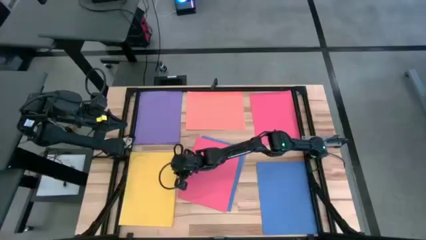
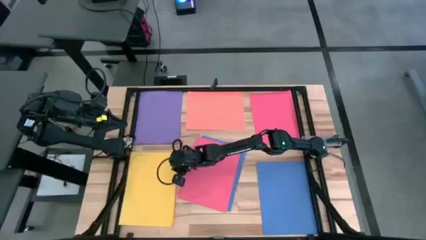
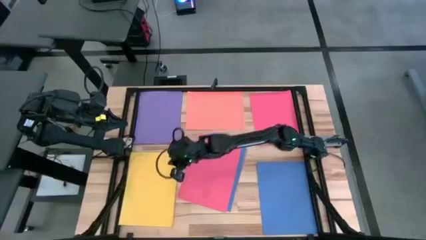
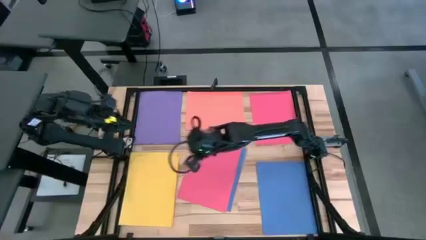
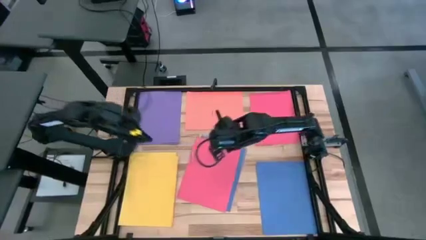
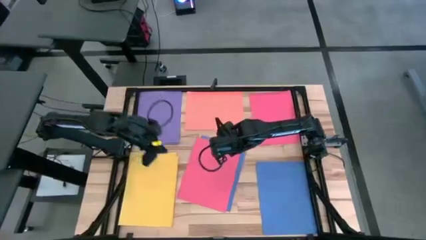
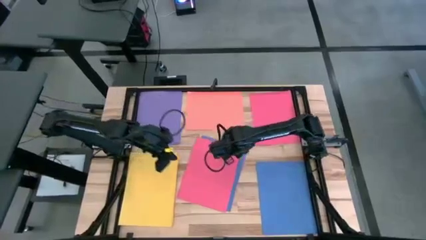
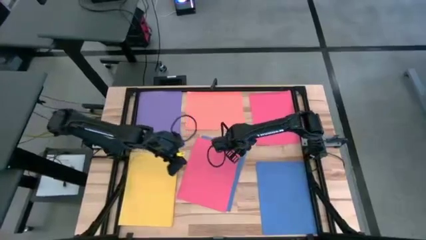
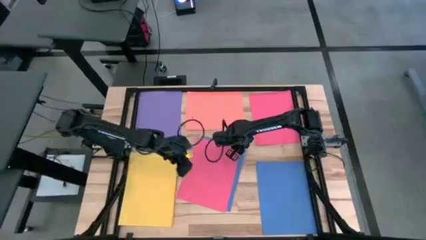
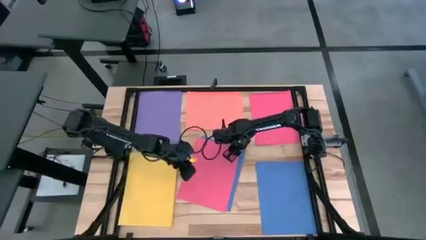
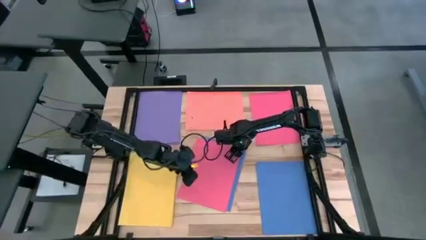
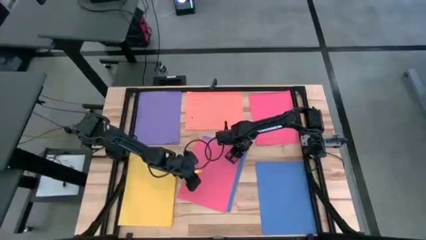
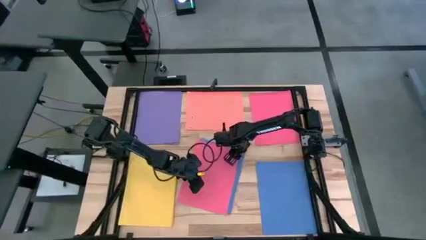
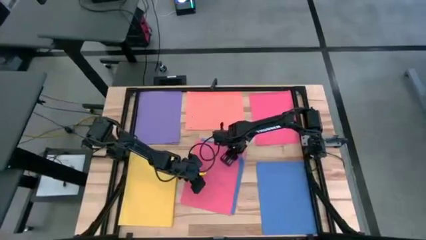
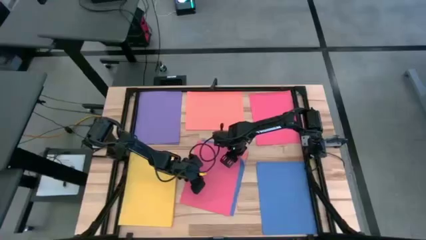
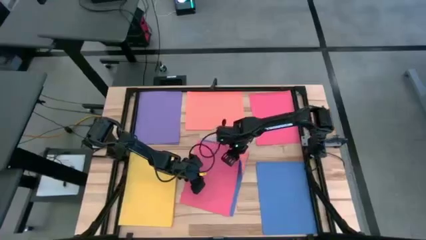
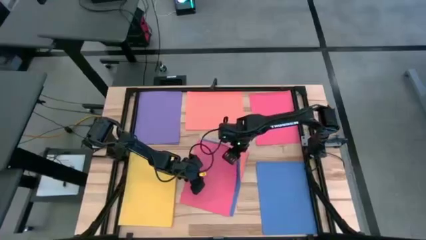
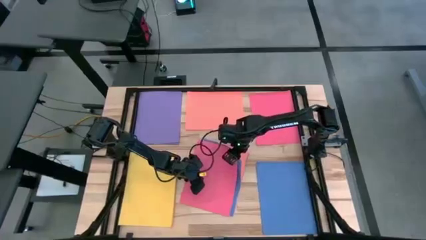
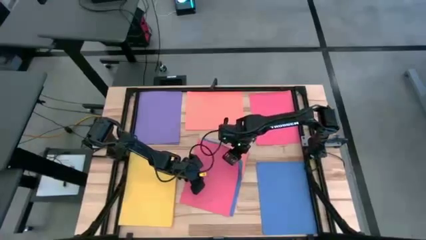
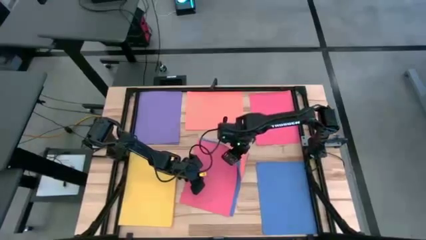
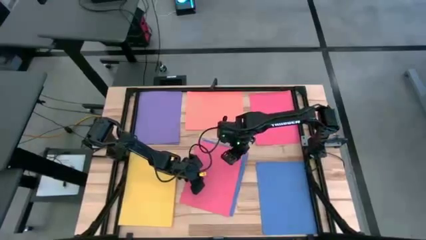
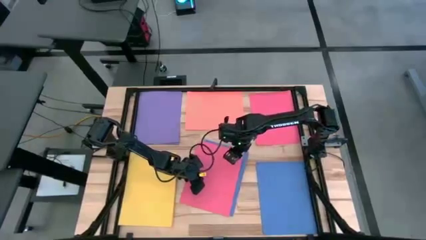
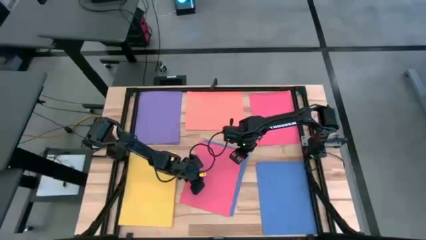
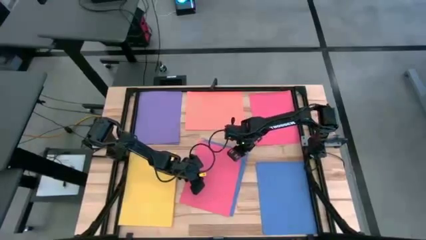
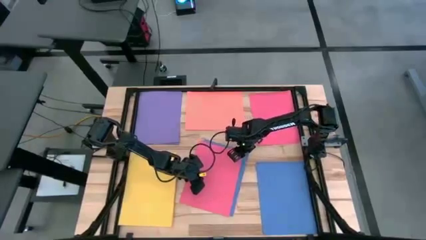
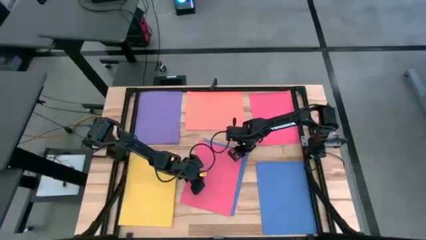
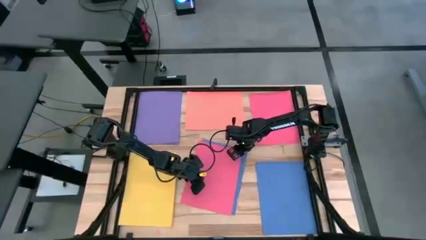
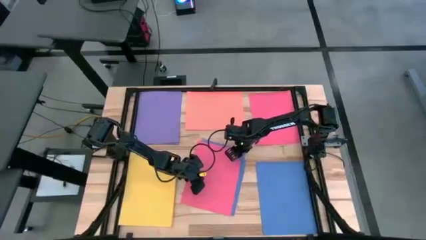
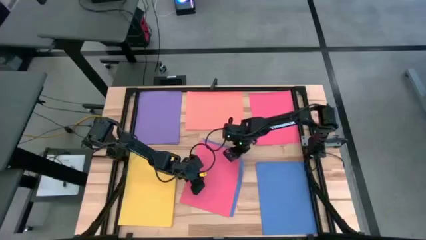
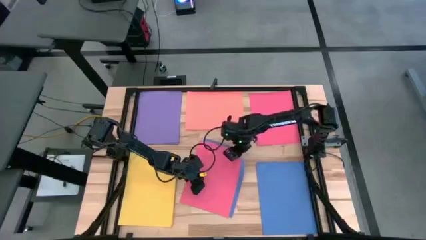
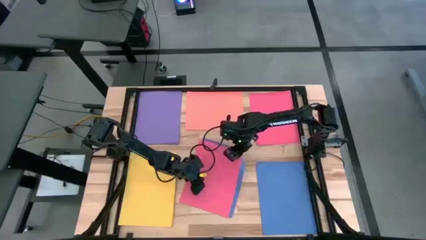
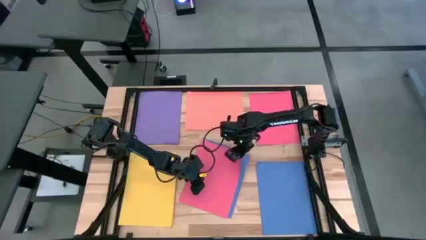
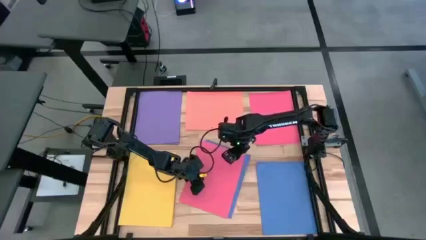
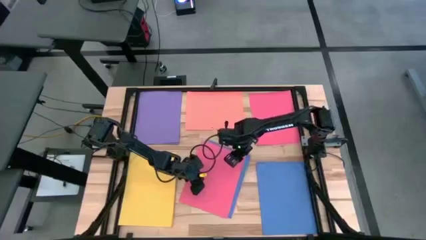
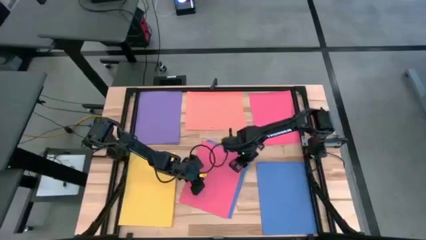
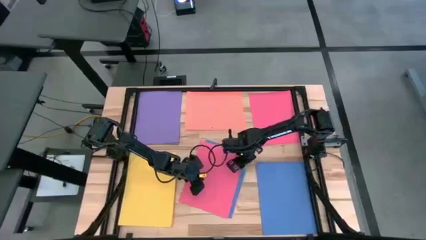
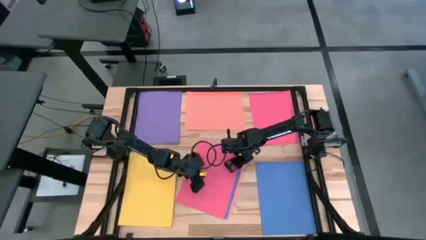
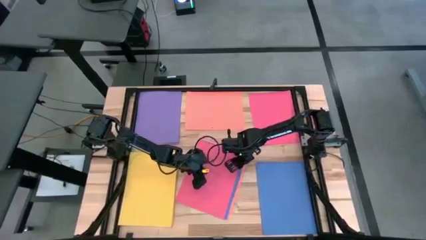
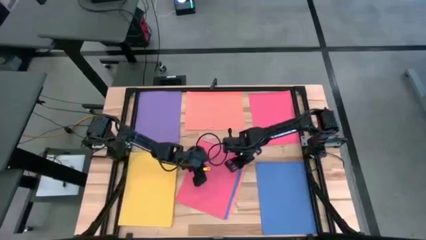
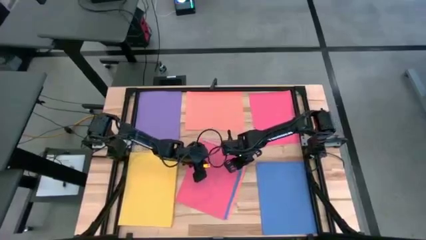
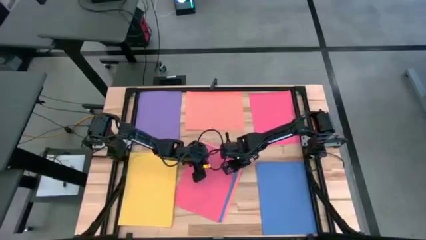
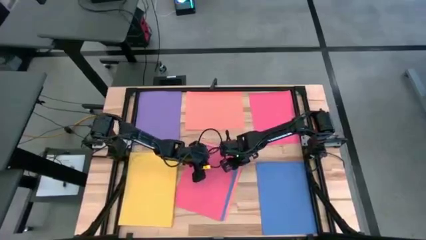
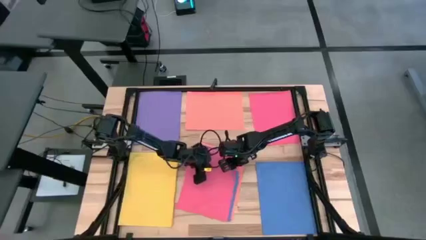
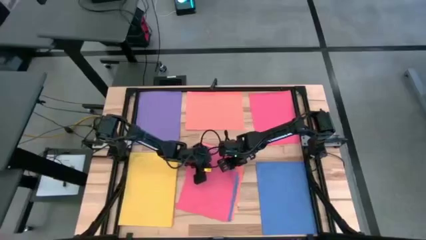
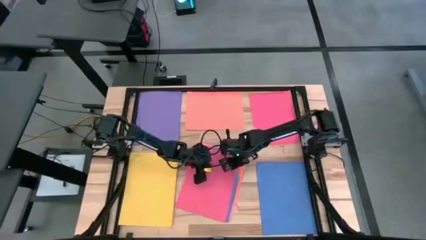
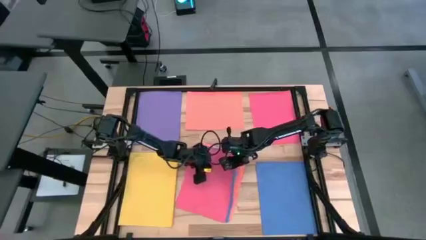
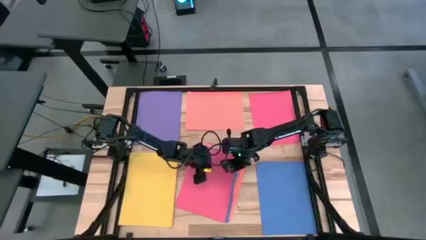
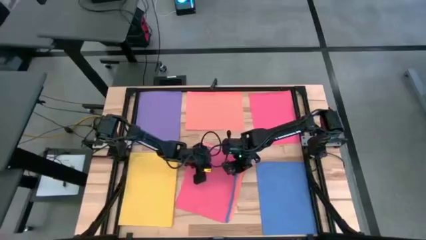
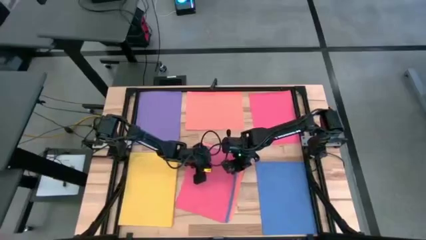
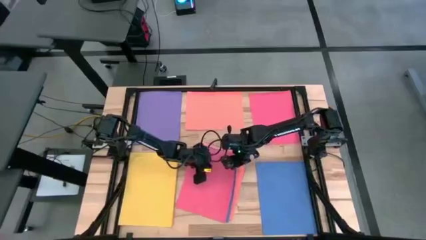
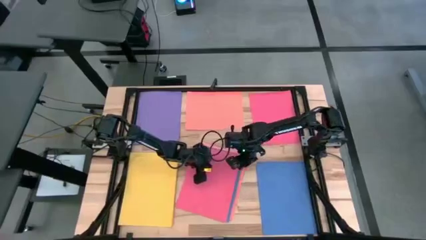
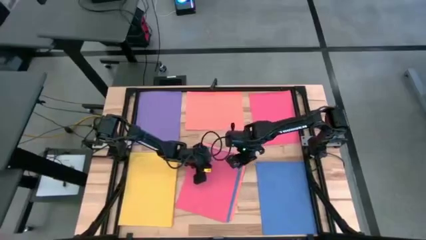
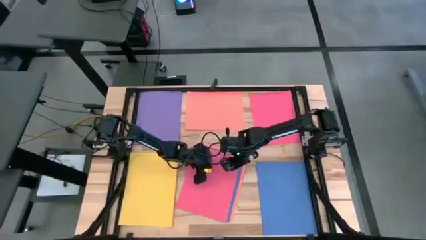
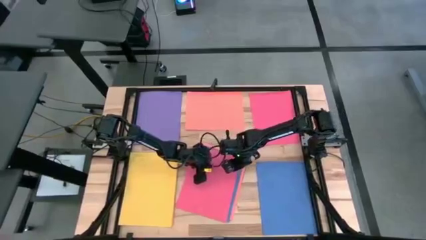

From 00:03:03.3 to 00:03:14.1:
Task: Organize paper
Stack the pink paper on top of the other pink paper

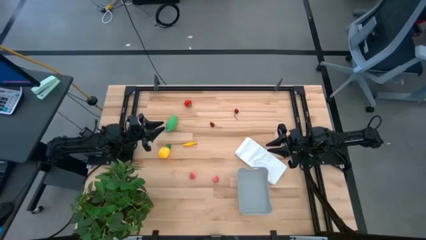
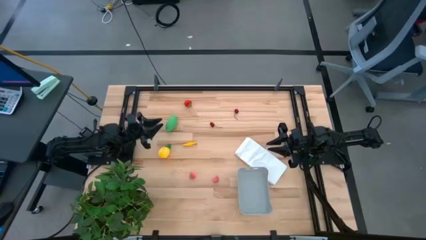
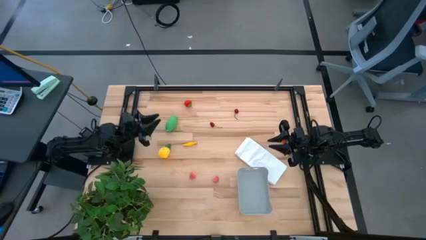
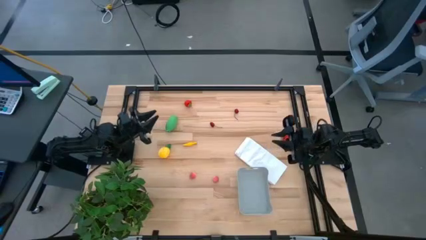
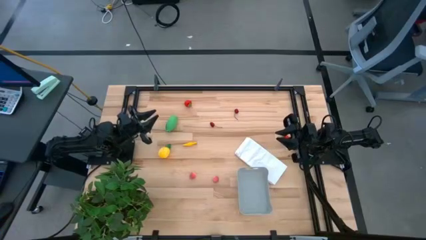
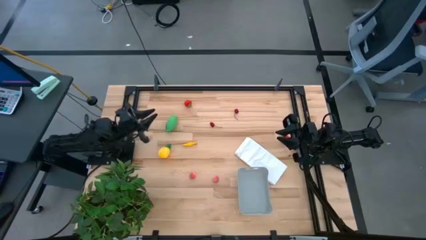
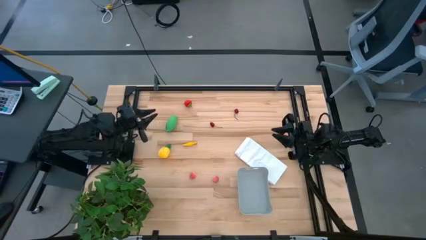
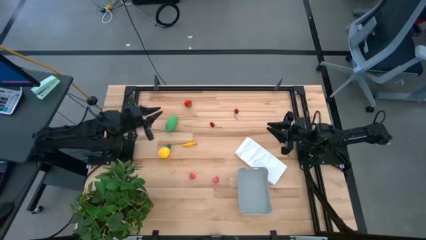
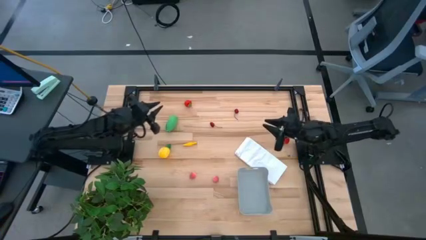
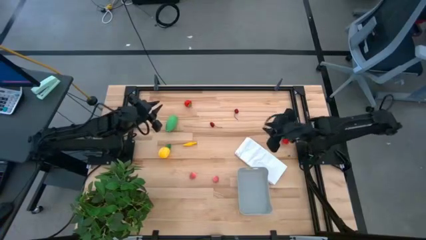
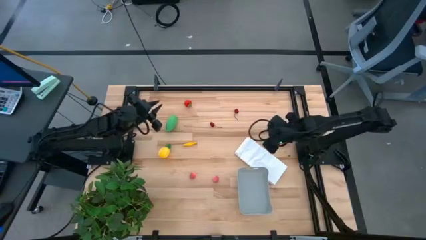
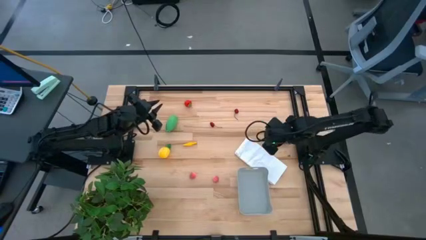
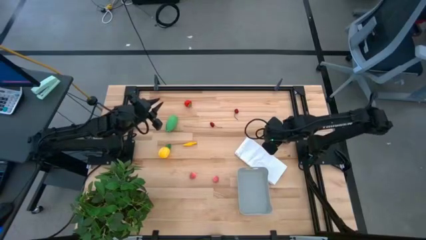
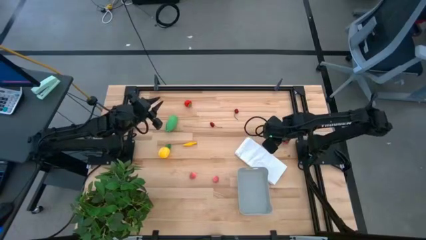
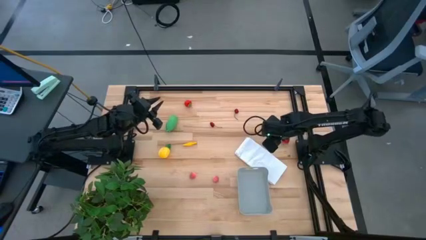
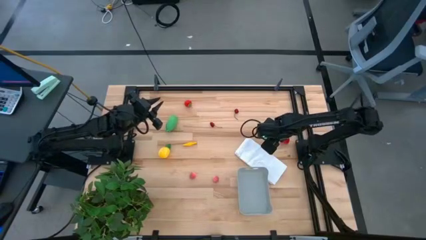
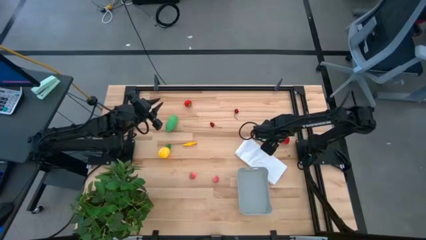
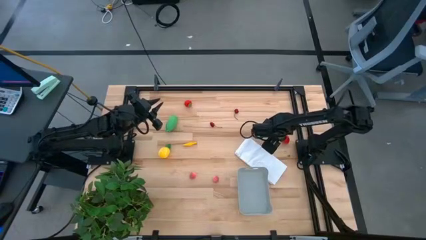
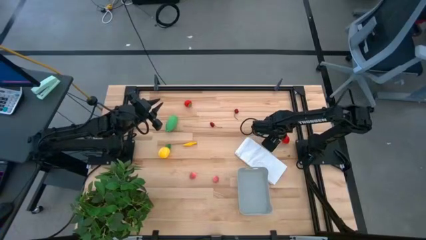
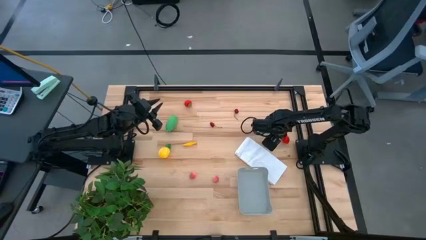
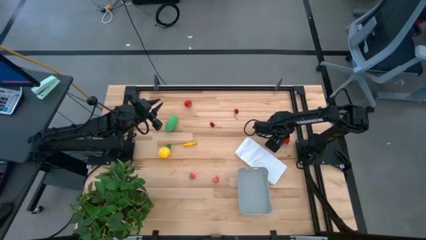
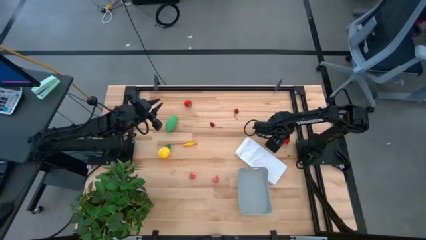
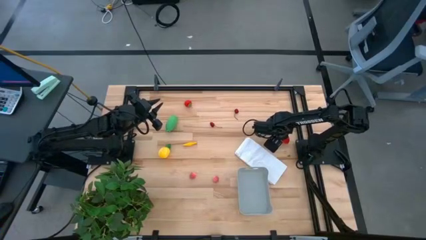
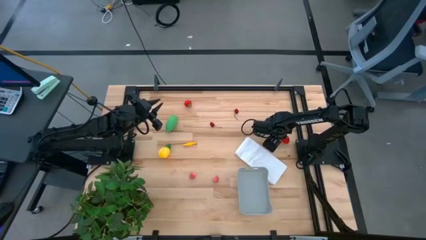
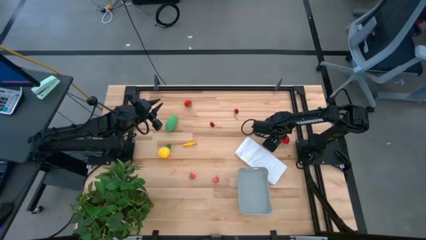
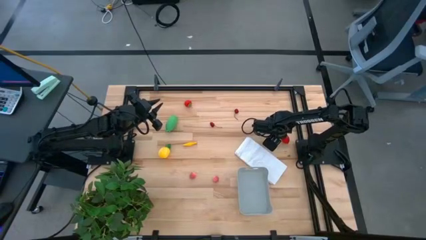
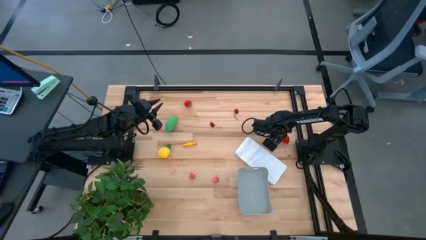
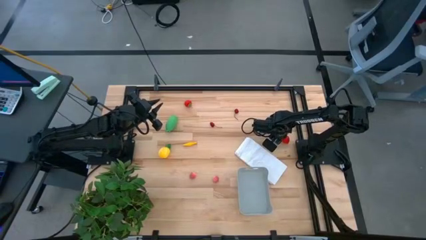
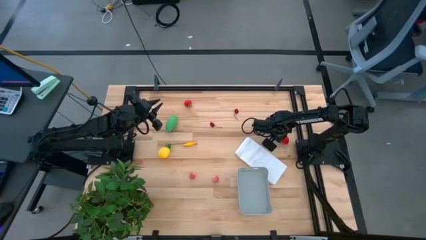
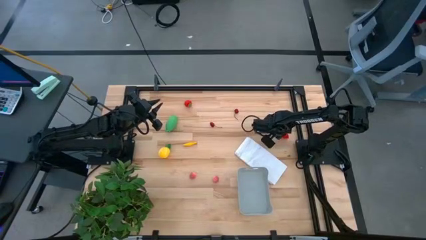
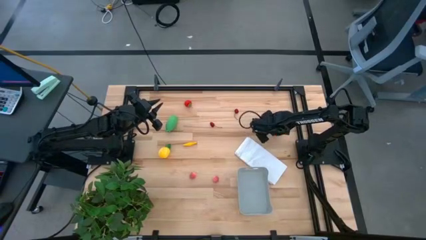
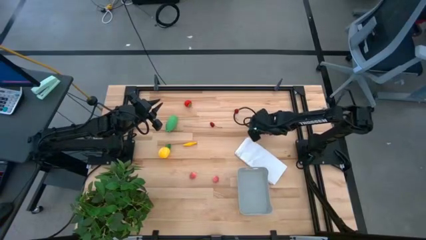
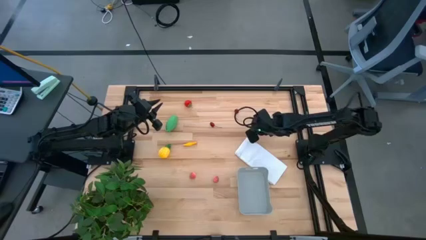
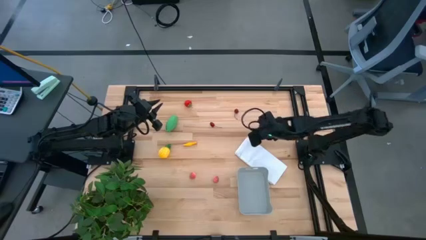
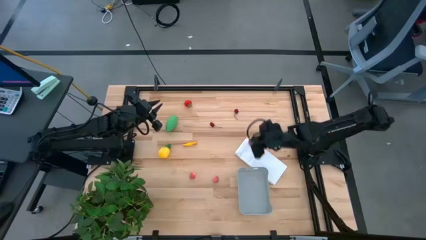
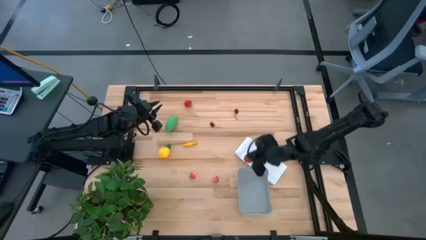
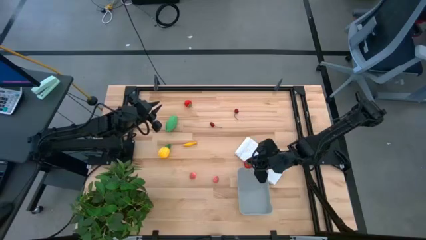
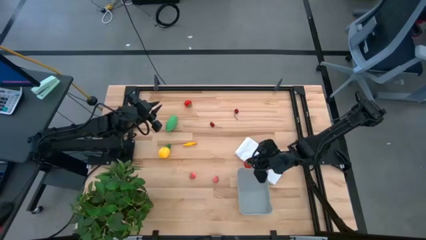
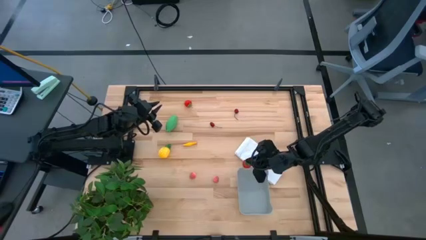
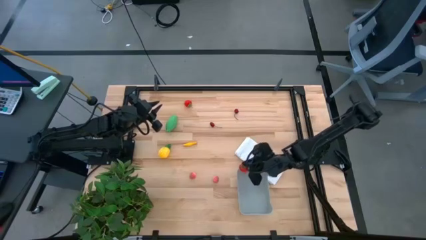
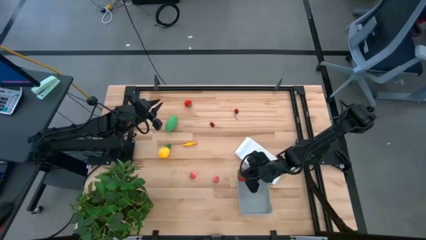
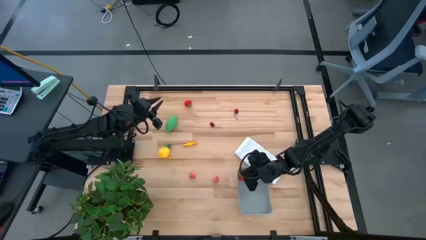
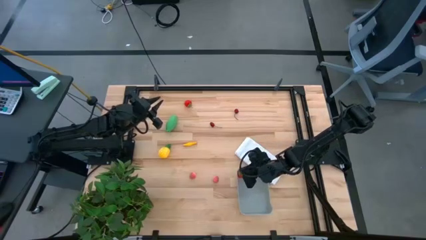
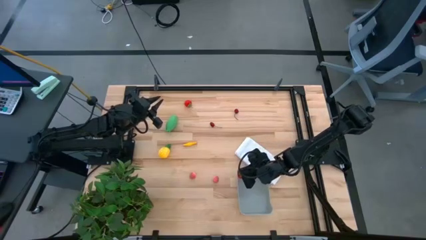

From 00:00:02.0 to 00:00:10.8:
Task: Pick and placing Produce into tupperware
Put the right red strawberry into the gray bin
